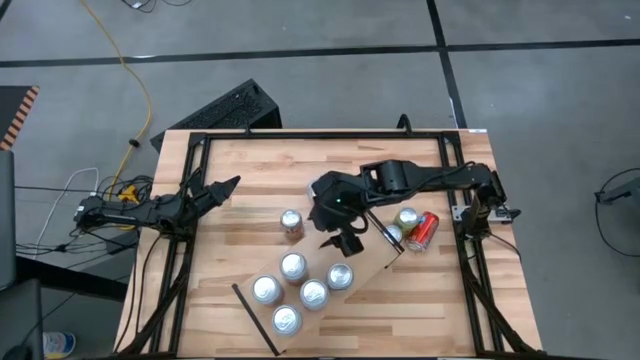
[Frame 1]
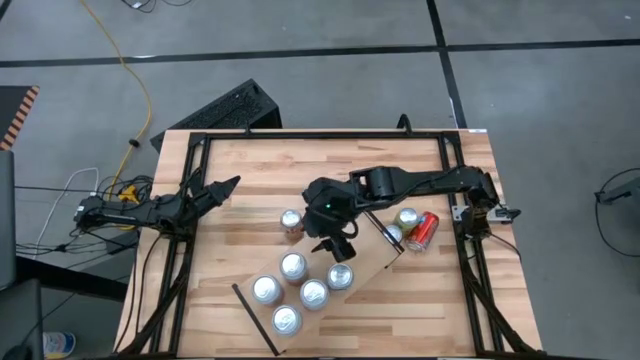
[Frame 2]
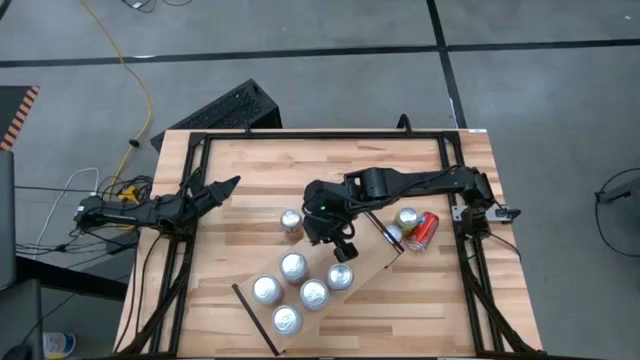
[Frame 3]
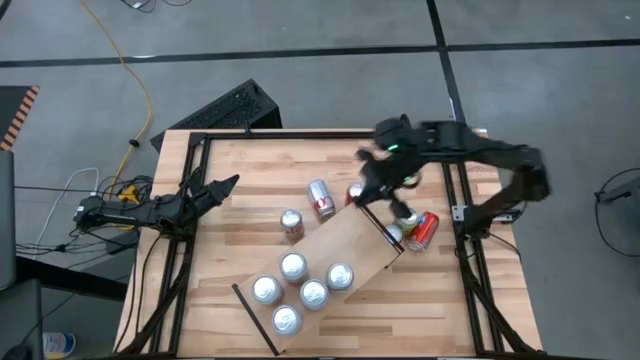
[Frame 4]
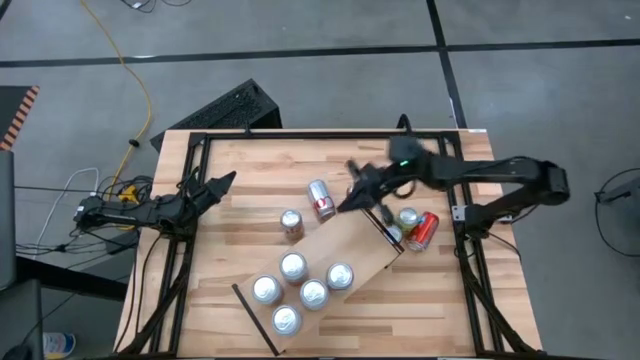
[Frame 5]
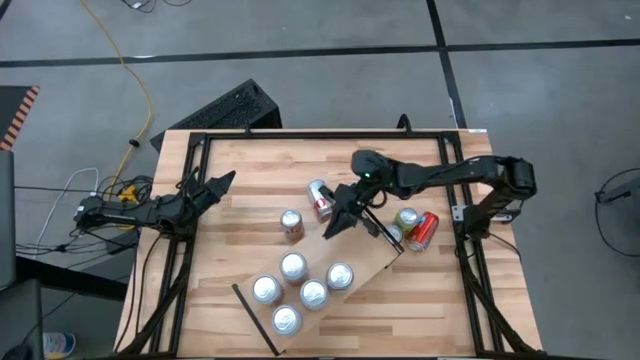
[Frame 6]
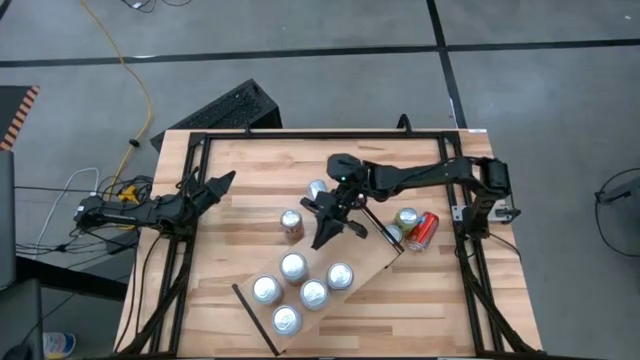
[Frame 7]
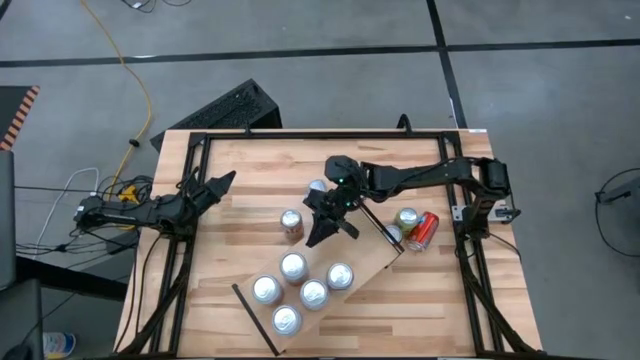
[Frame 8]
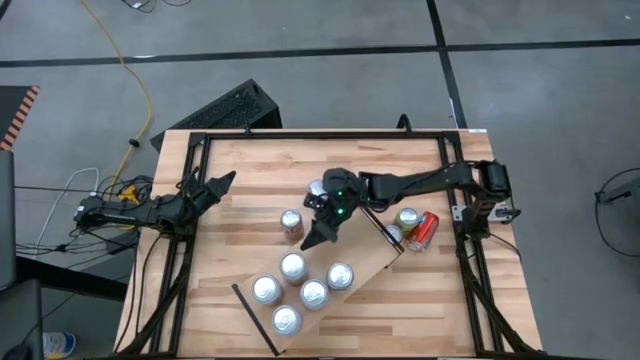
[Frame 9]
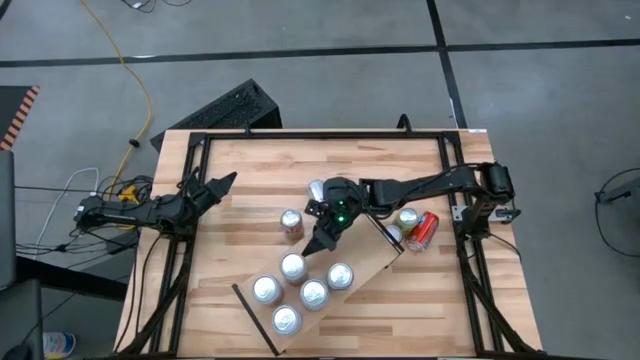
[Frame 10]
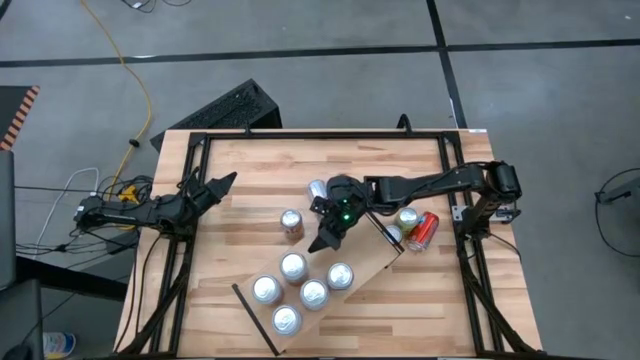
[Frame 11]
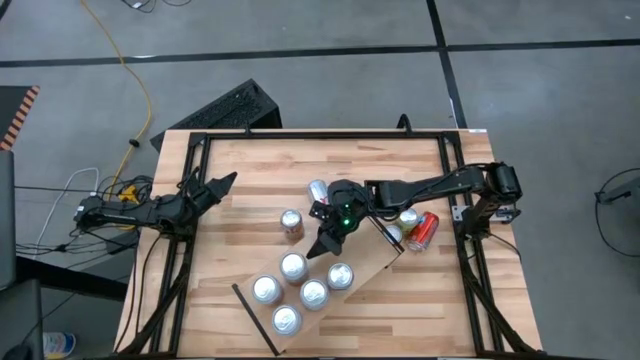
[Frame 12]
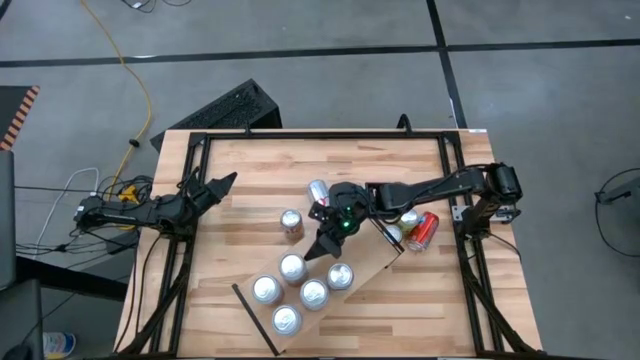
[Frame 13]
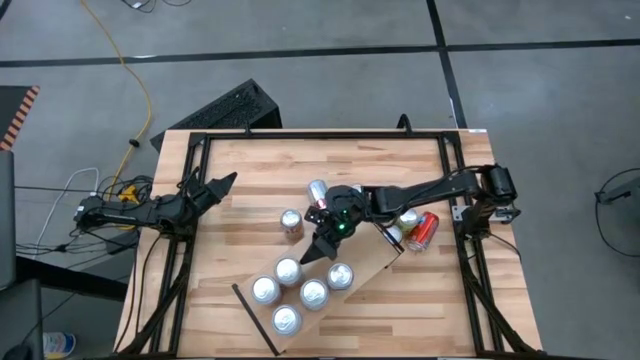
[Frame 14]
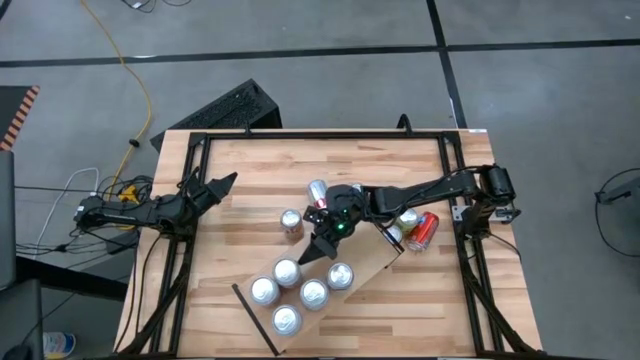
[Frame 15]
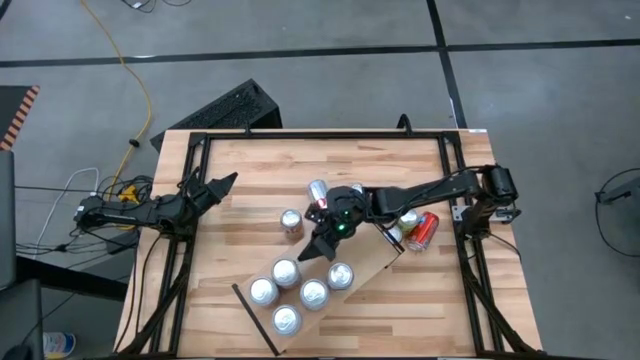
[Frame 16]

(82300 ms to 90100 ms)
Task: Place canned beverage on shelf
Adjust the orange white soda can on the shelf

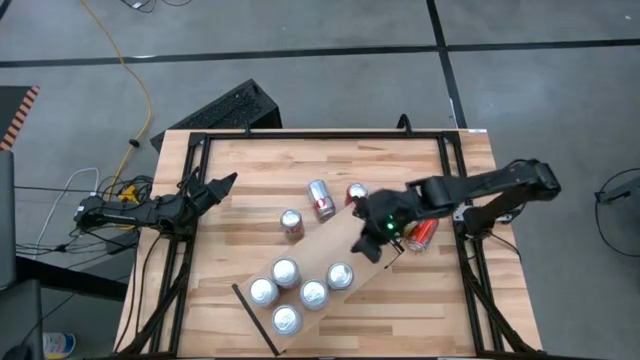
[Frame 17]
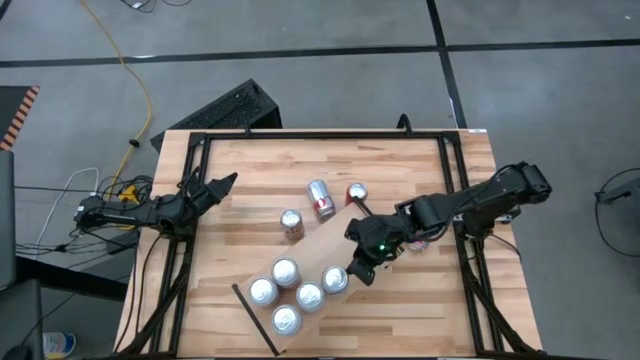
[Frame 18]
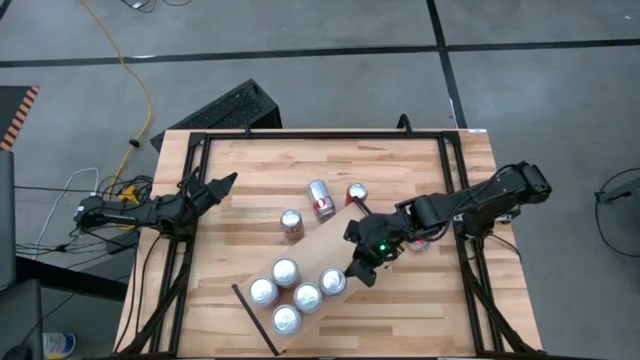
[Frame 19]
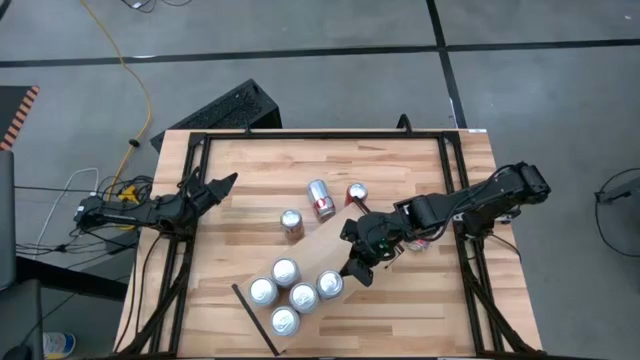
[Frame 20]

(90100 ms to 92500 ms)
Adjust the red silver soda can on the shelf

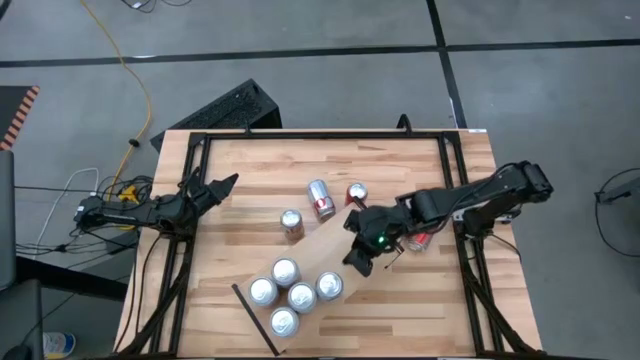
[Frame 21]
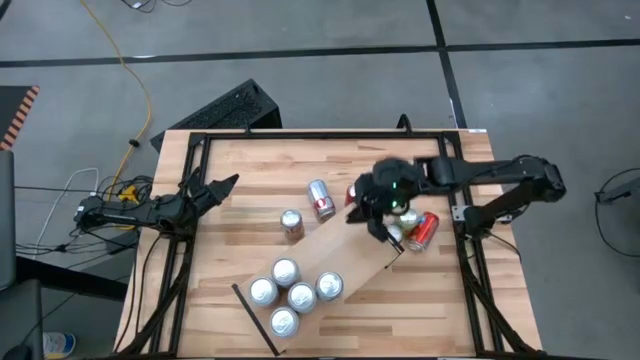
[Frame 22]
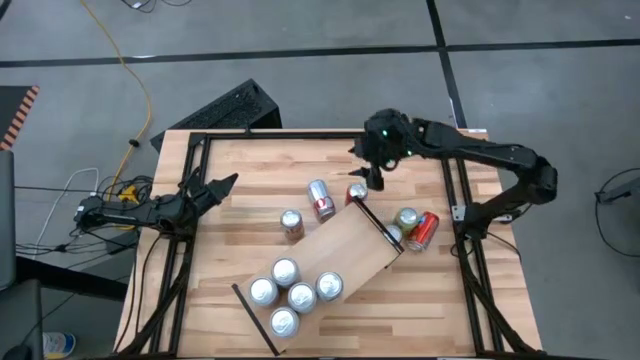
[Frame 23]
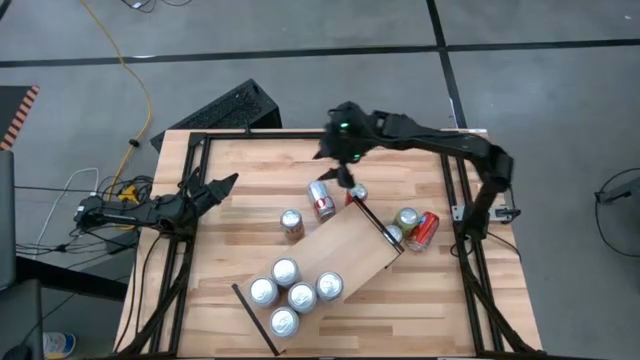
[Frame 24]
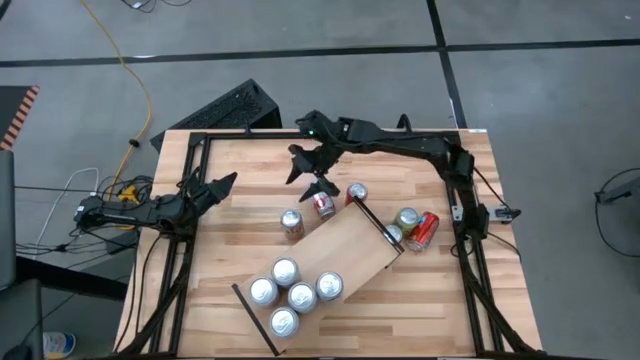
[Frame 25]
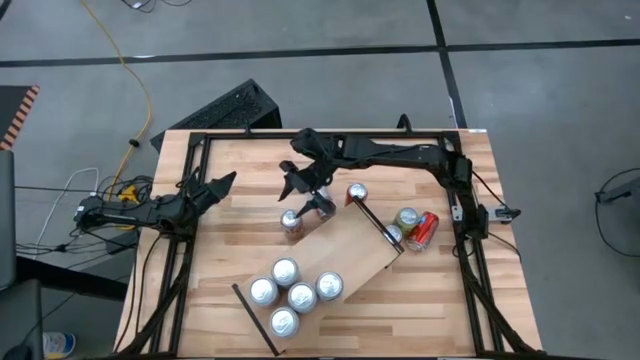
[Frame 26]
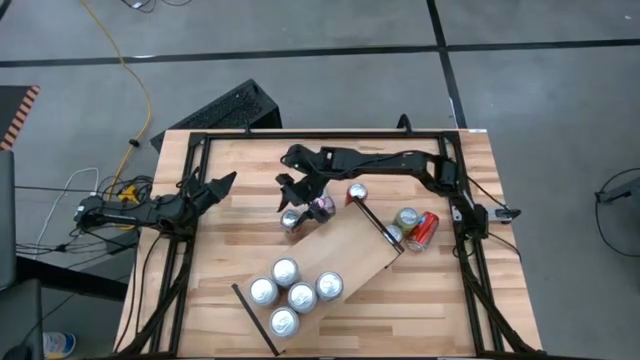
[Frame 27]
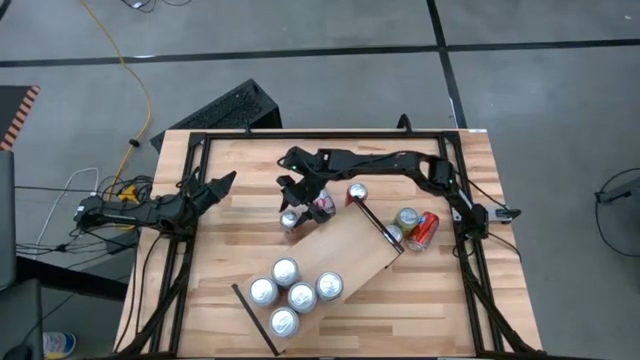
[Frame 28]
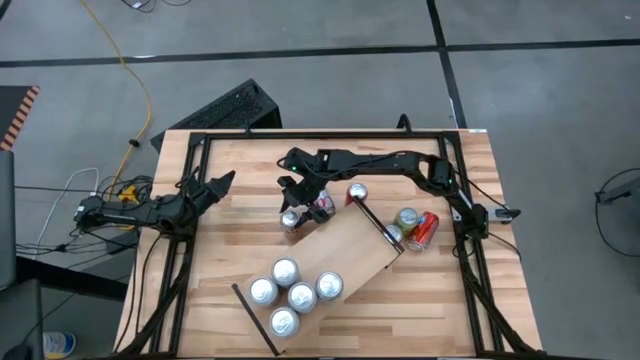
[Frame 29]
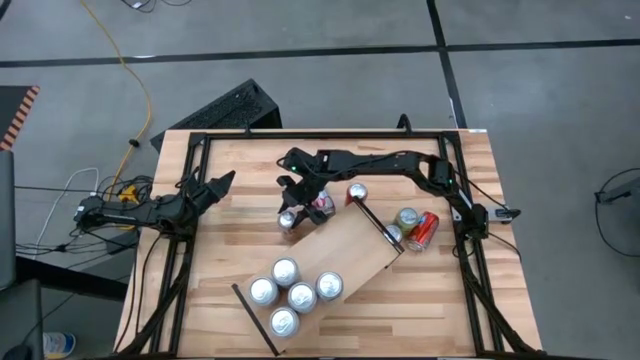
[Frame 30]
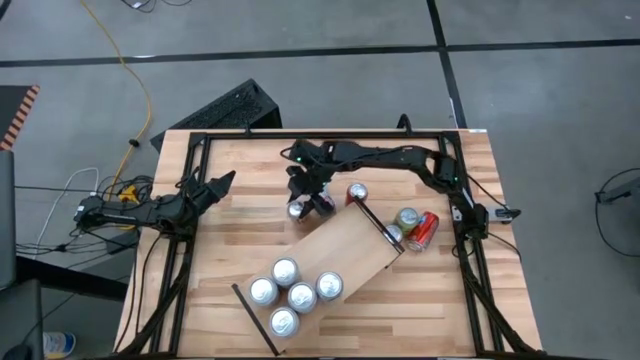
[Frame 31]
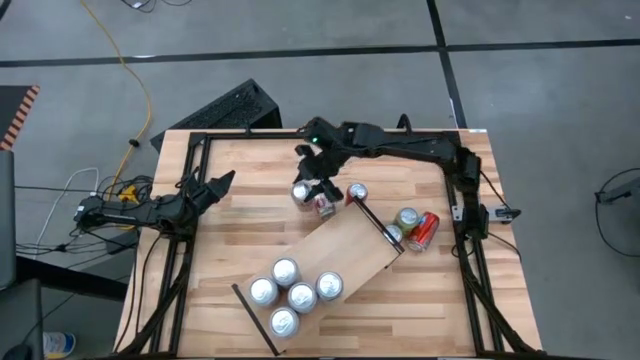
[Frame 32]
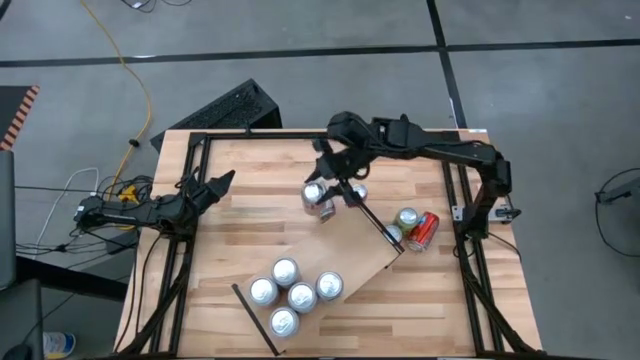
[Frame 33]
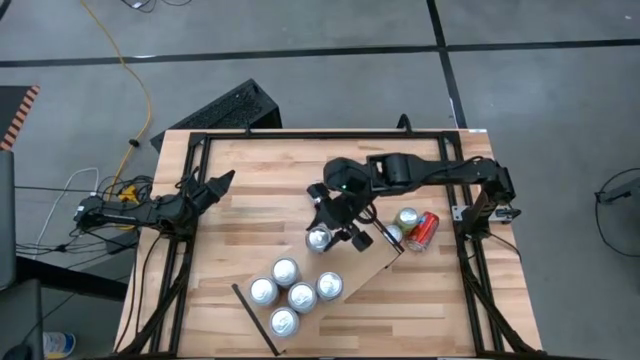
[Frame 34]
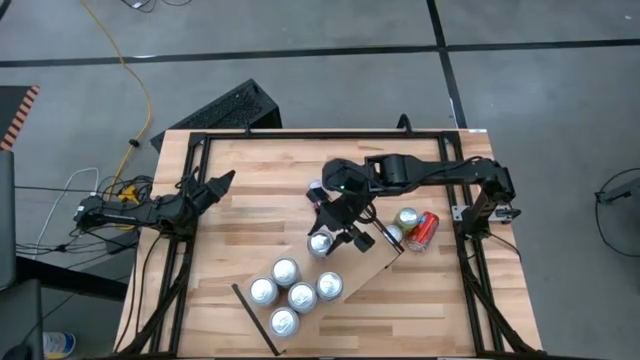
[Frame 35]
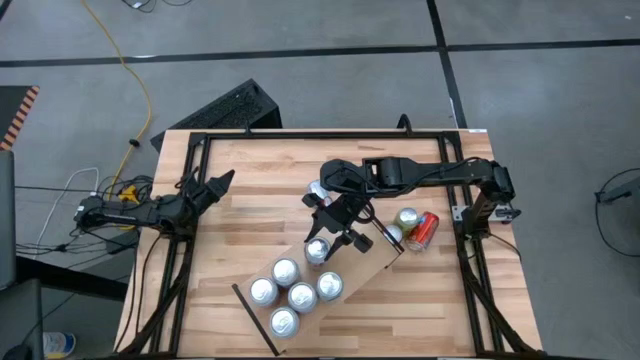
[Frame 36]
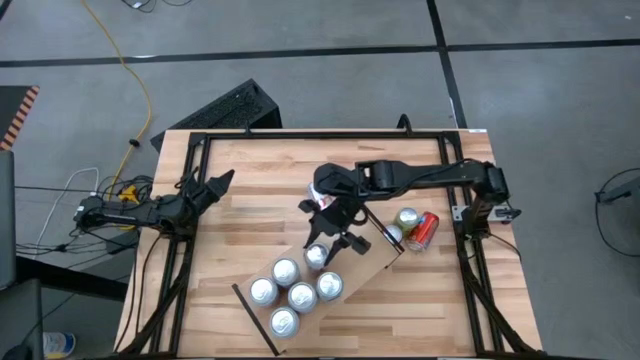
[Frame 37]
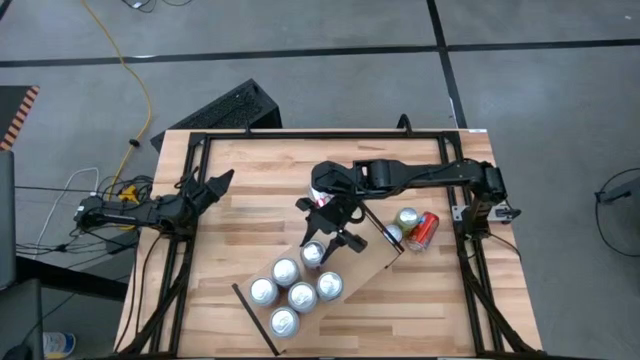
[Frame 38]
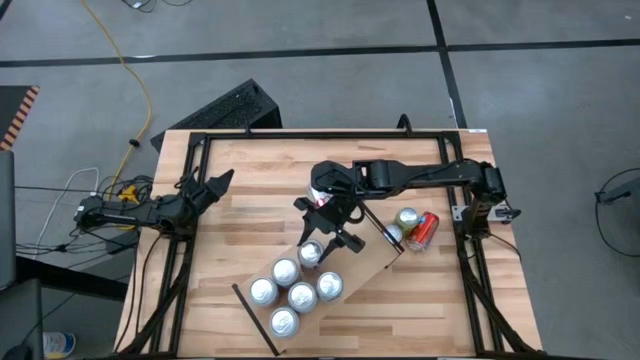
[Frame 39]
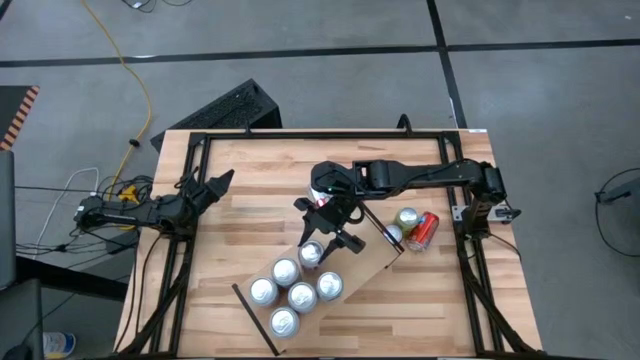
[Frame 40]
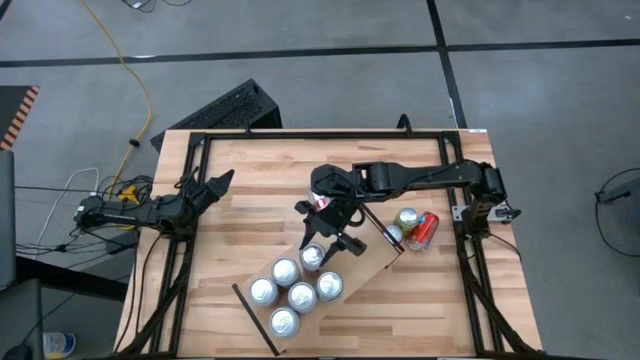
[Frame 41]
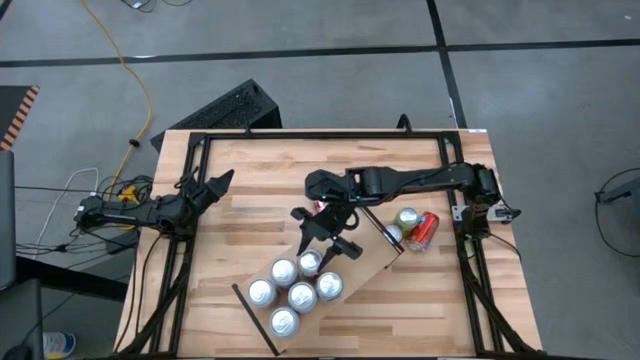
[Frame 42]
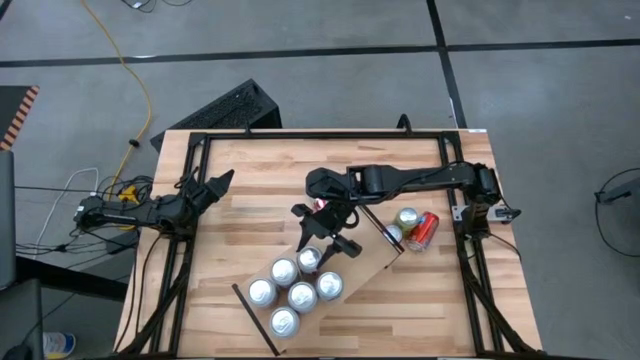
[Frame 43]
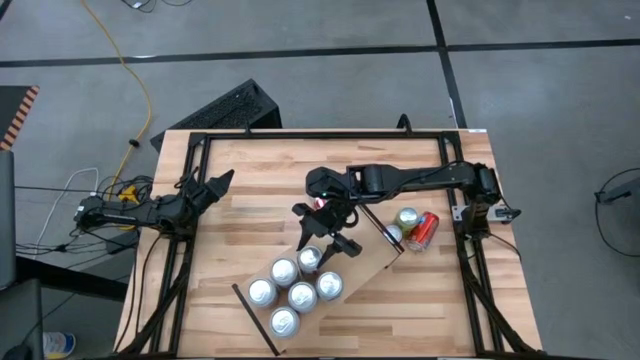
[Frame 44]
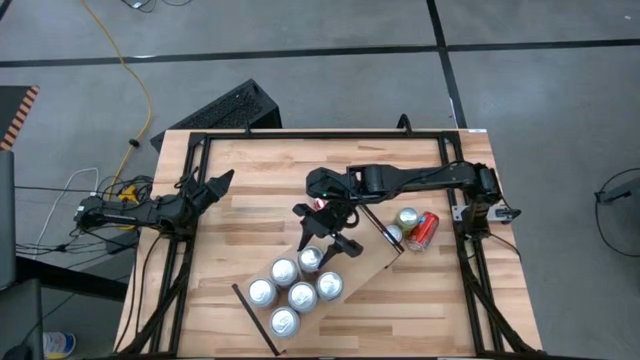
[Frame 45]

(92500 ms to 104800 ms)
Put the red silver soda can on the shelf aligned with the other red silver soda can
